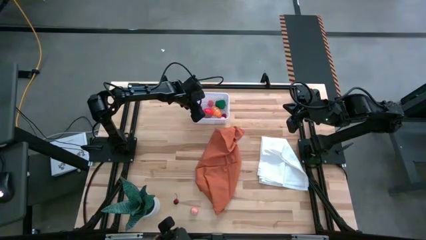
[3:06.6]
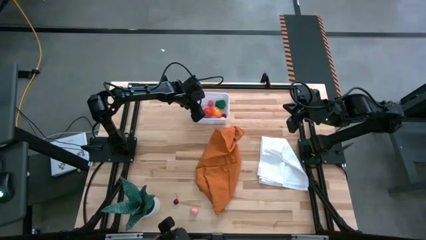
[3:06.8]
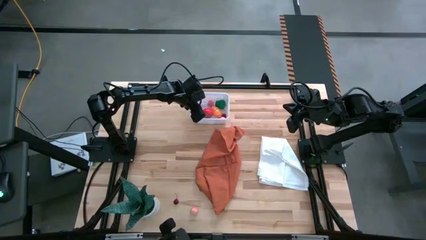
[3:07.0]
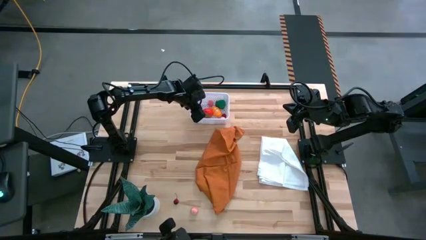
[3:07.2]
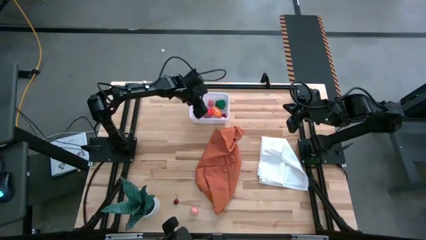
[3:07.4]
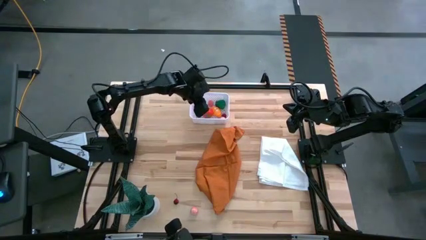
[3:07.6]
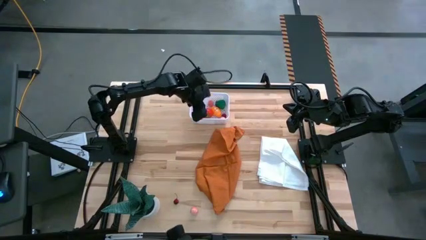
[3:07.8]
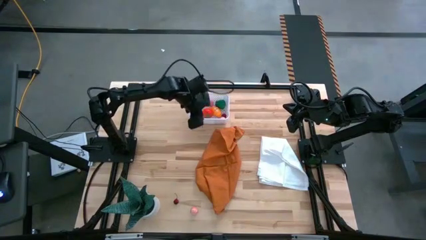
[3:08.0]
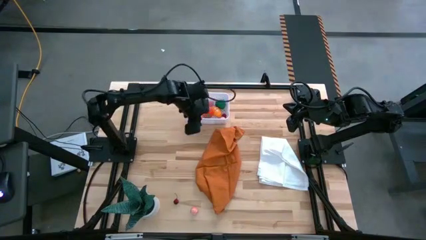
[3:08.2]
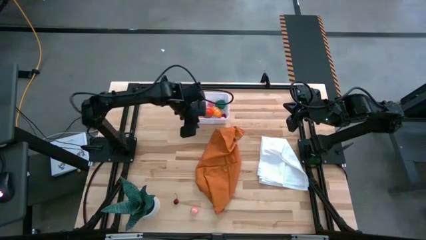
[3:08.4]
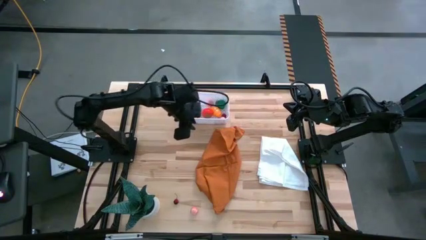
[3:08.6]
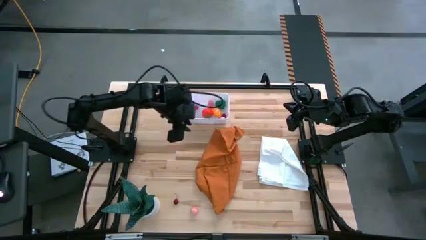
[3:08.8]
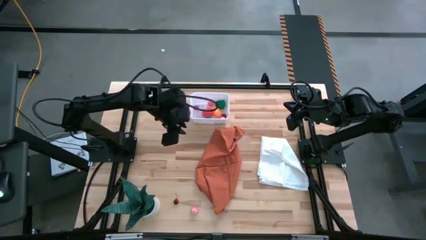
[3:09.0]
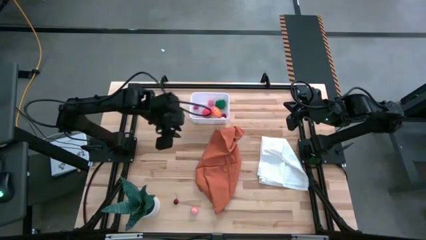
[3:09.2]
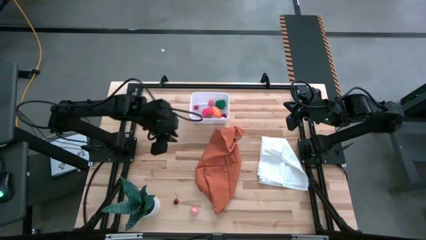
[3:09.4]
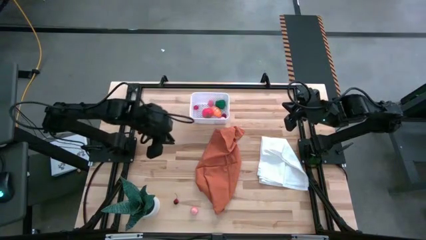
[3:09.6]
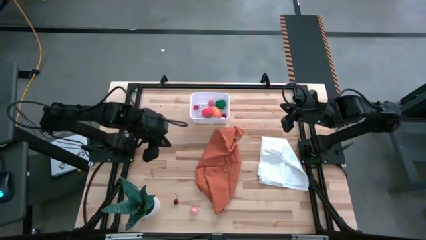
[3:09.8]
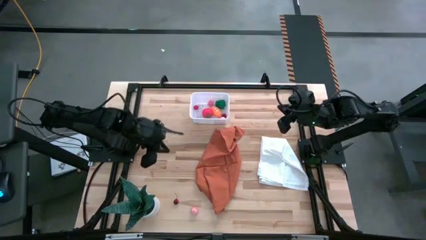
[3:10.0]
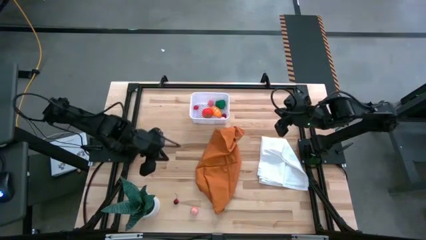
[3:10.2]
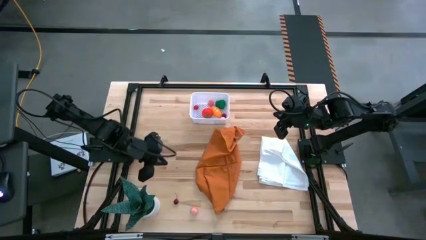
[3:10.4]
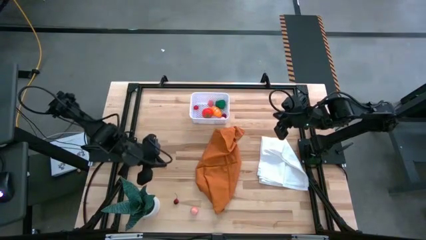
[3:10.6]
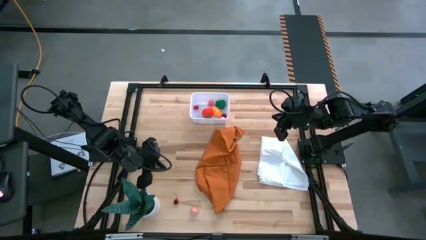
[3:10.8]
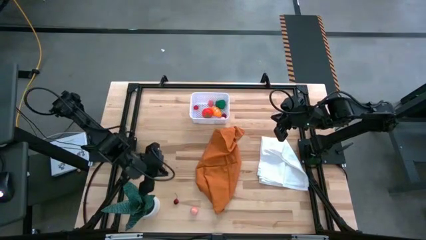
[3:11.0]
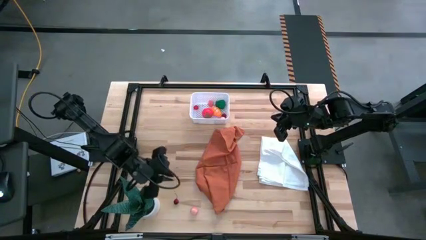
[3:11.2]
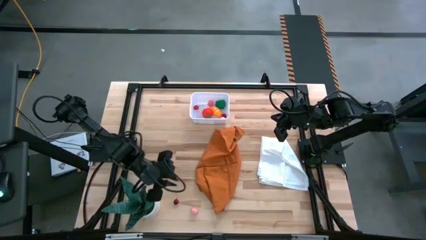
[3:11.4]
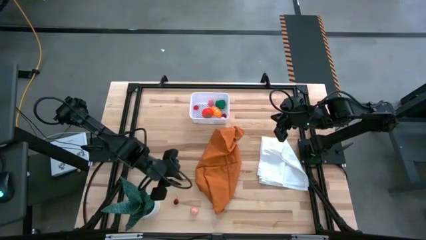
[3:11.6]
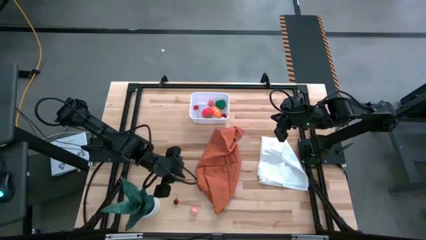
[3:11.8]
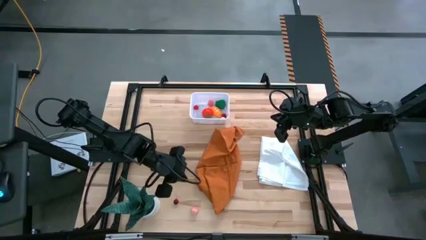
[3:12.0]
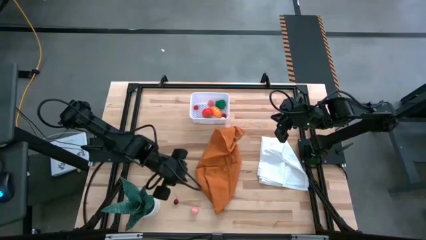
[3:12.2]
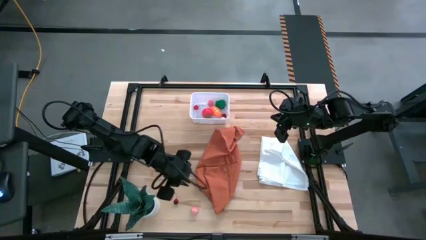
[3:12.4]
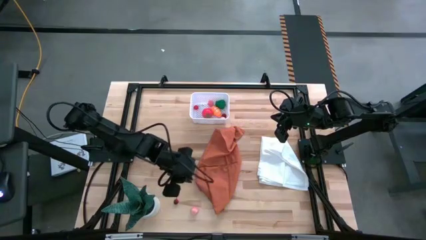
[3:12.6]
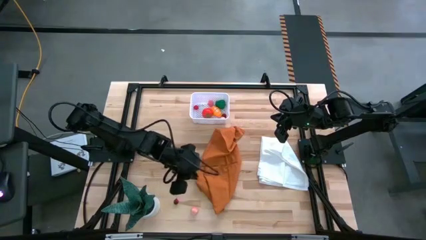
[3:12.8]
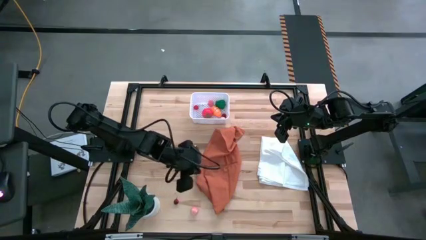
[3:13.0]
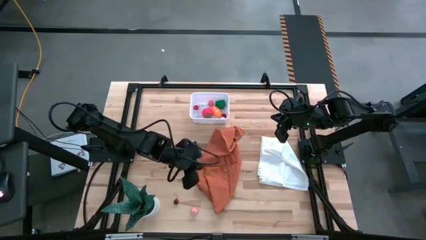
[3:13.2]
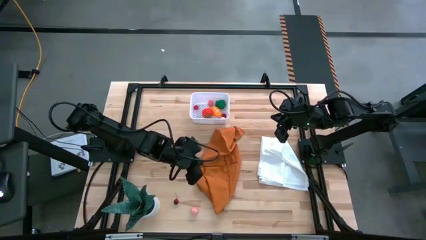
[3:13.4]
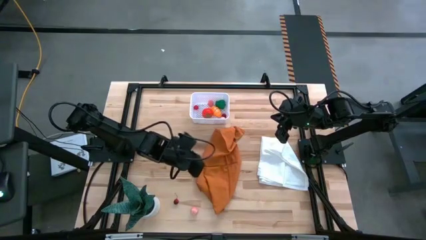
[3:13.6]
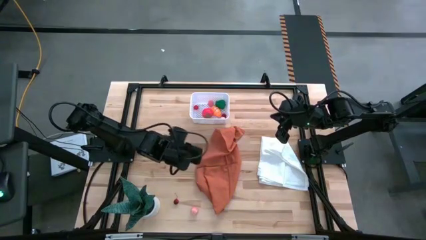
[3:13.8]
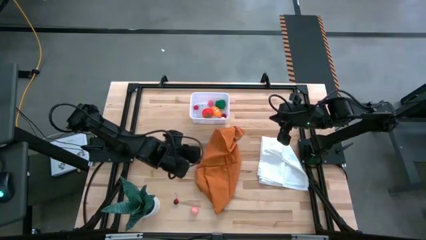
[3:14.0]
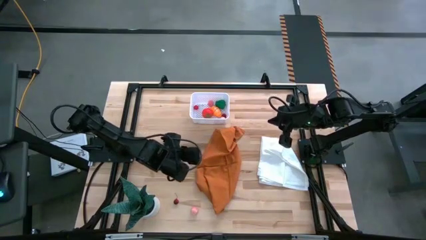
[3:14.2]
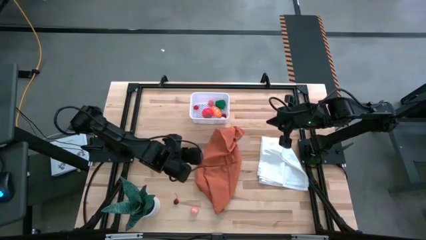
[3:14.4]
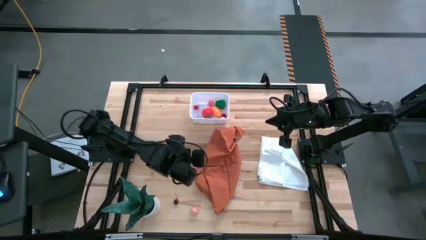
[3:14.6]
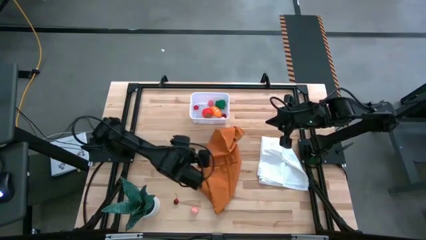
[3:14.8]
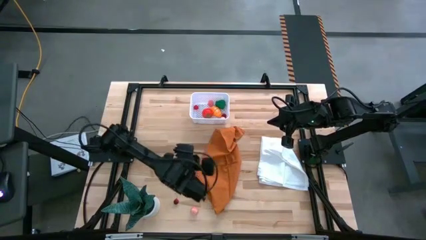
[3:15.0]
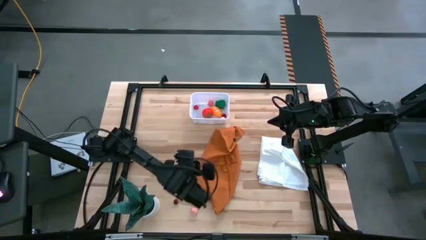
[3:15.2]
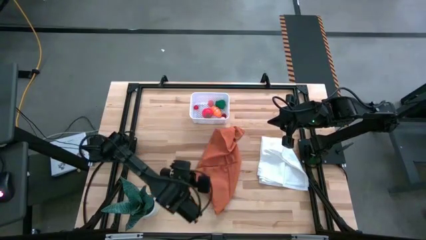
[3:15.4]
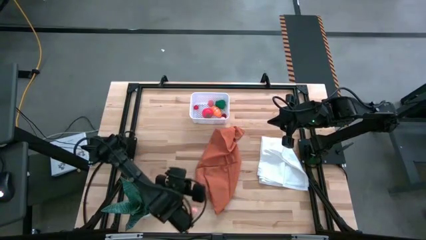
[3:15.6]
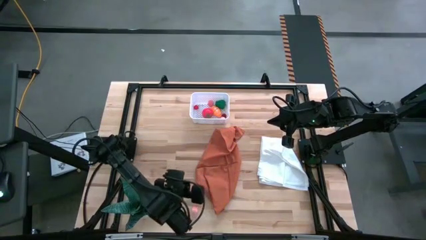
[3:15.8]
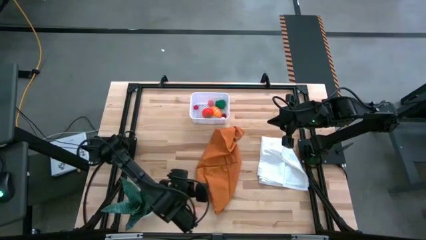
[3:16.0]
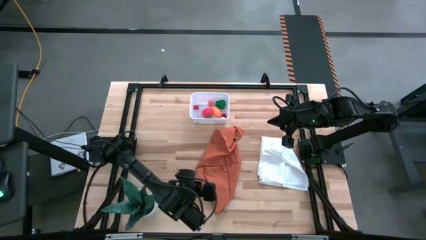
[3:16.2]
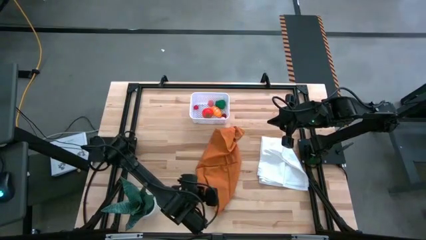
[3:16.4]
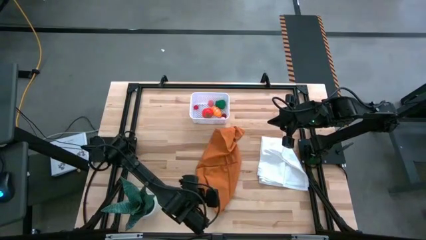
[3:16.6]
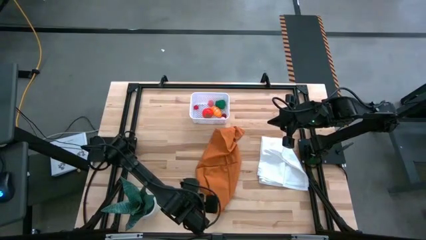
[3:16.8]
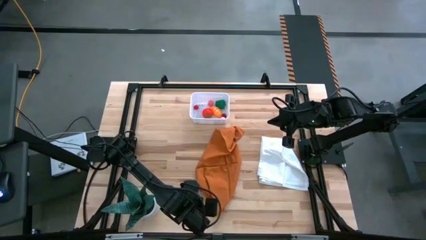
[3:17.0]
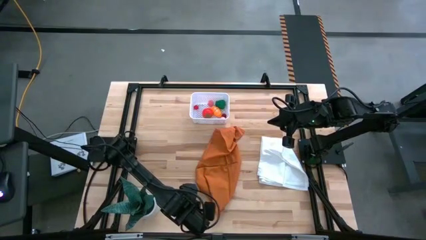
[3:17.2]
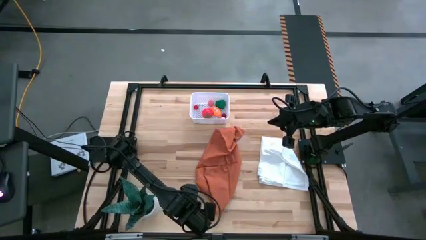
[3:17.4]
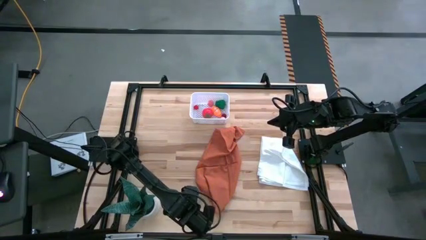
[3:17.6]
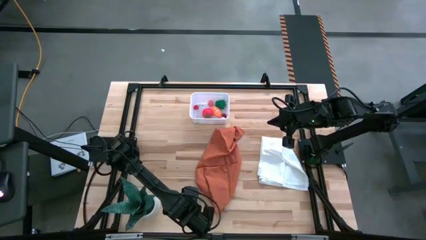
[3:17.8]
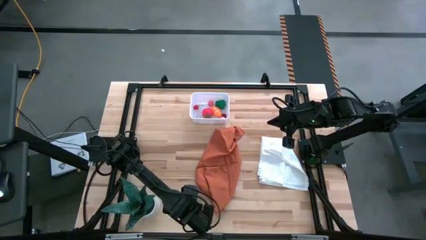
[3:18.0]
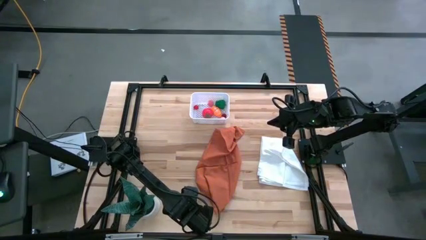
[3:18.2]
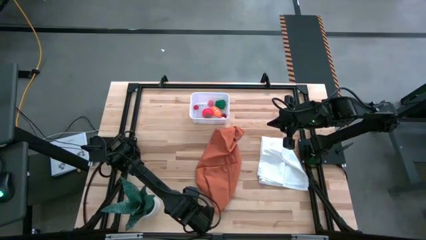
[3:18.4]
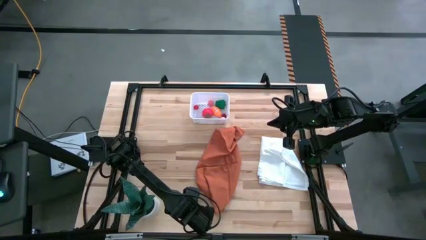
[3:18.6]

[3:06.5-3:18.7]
Task: Pick and placing Produce into tupperware
Put the pink peach into the white basket
